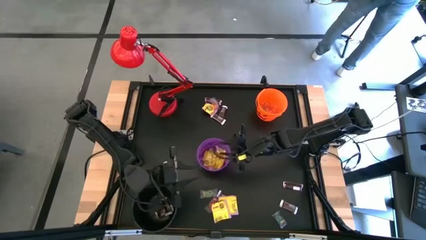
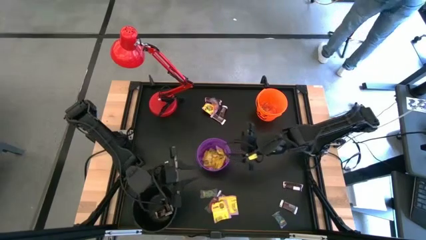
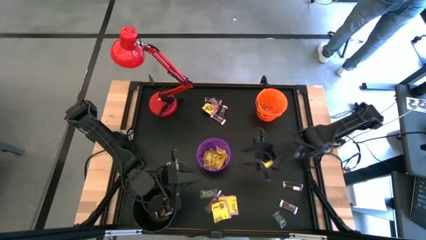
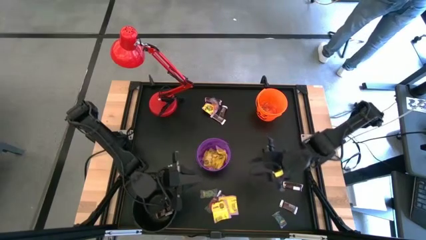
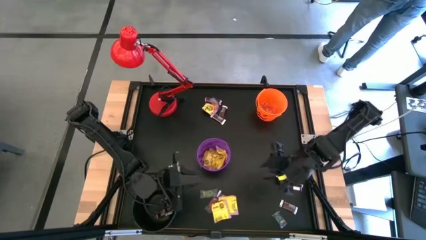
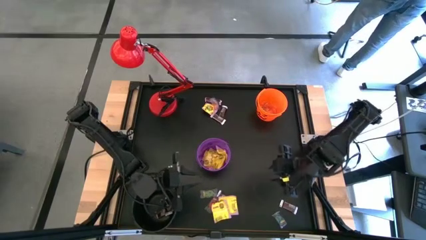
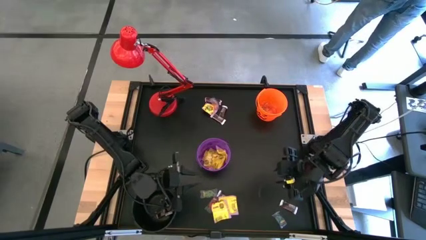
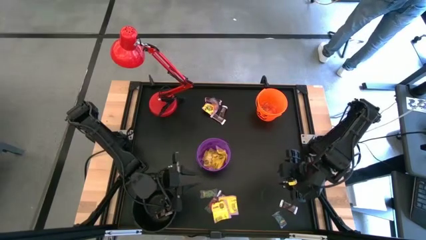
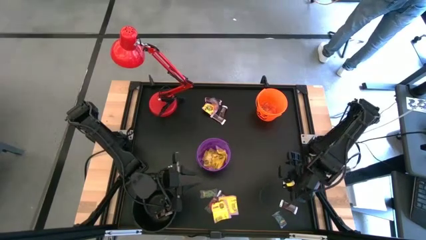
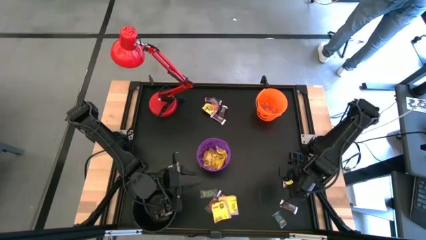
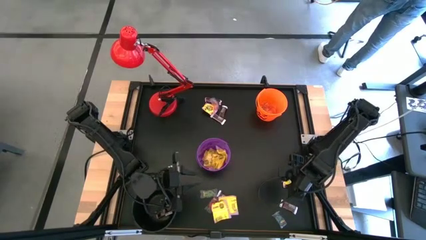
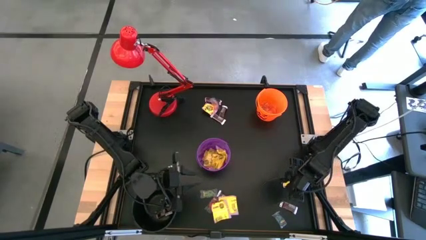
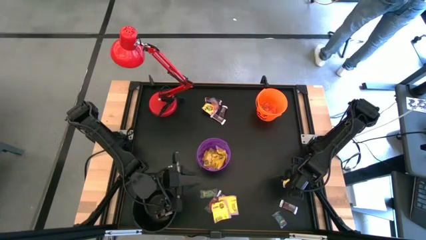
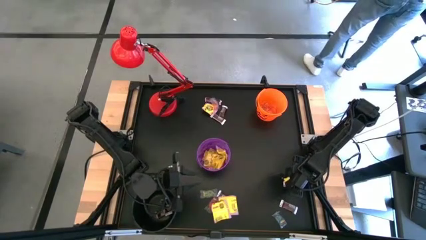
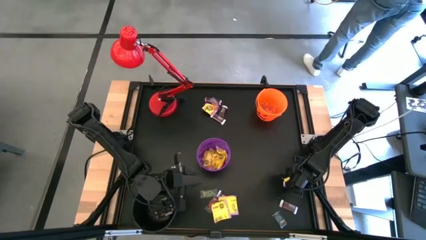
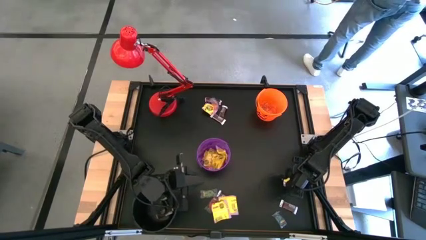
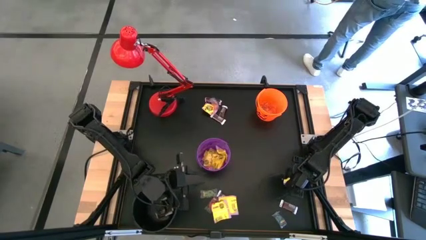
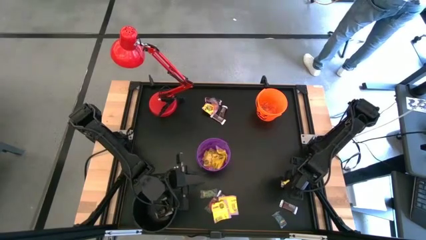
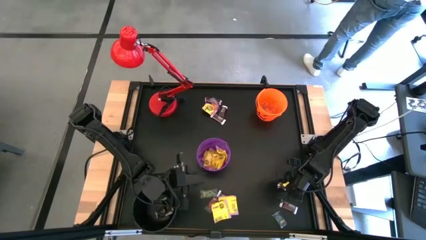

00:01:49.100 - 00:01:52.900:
Task: Sort candy
Put the brown chocolate bar into the black bucket

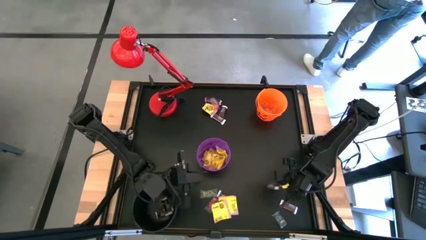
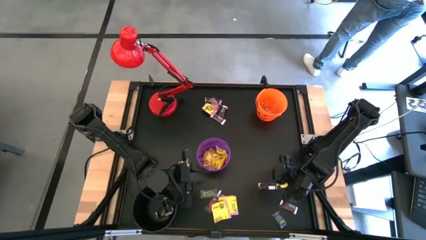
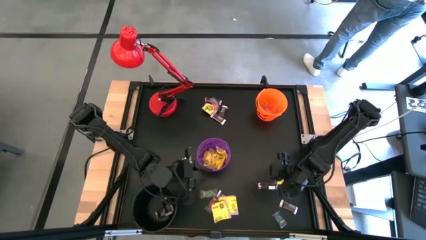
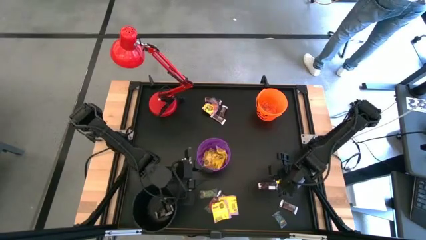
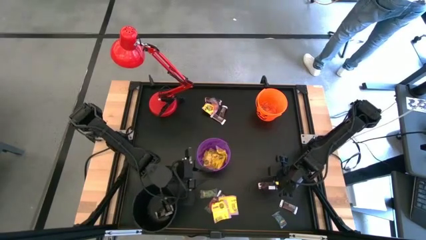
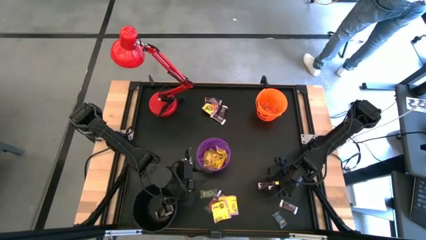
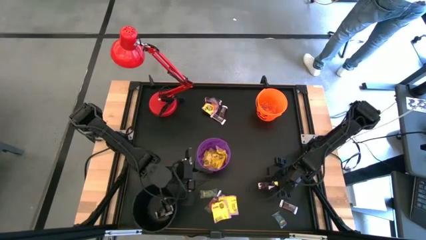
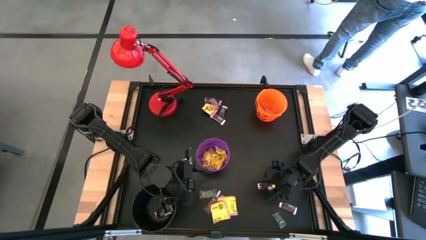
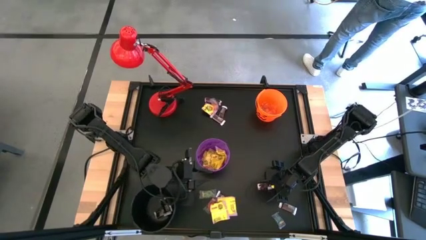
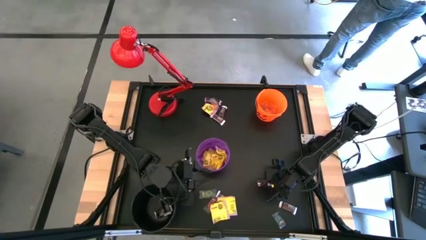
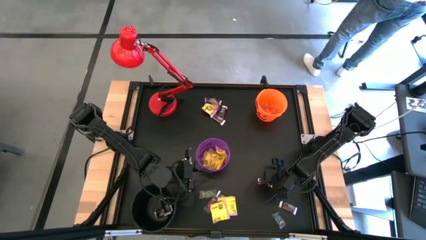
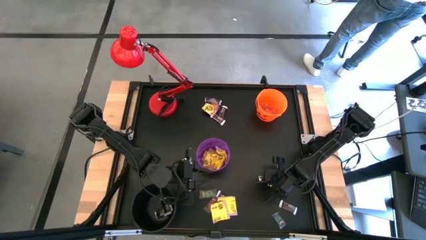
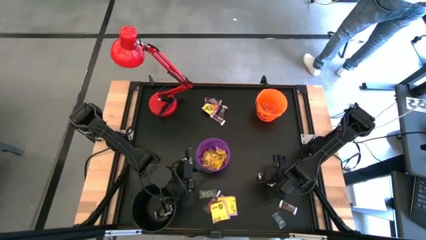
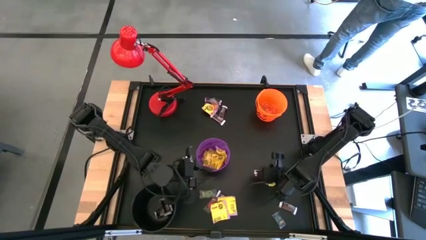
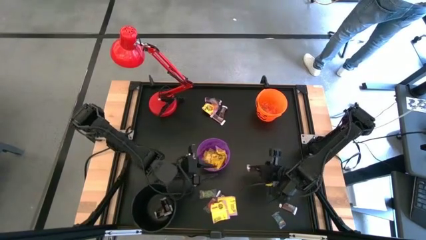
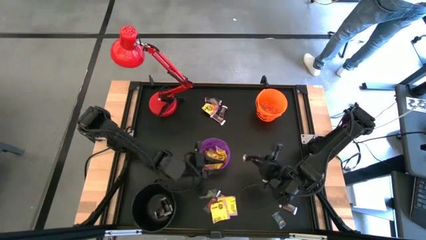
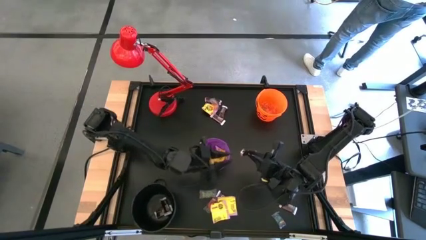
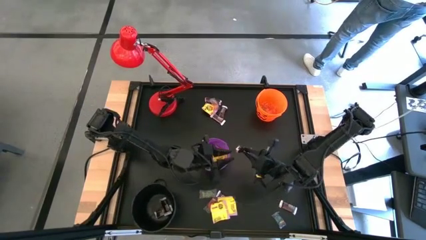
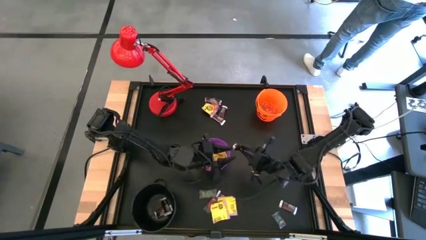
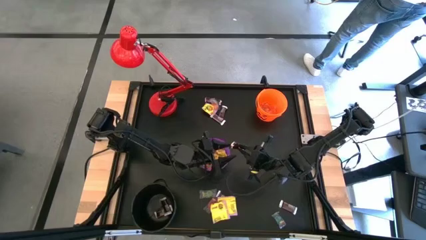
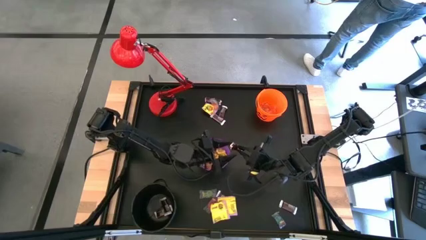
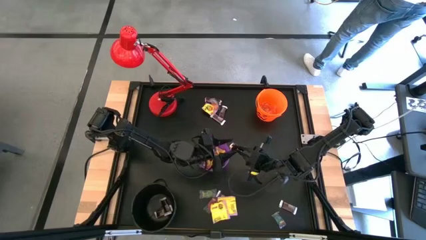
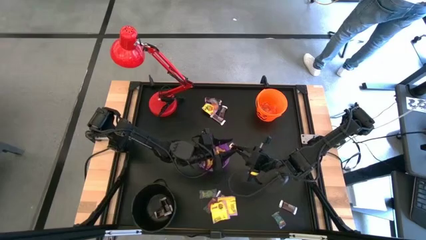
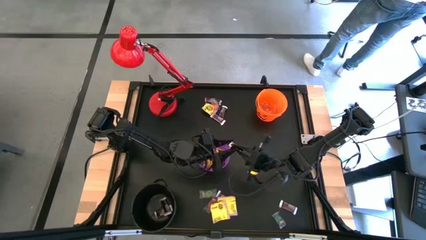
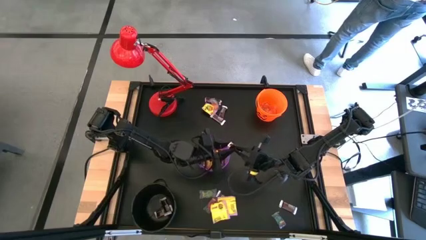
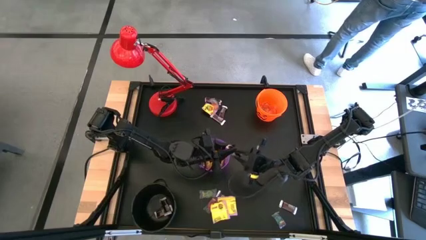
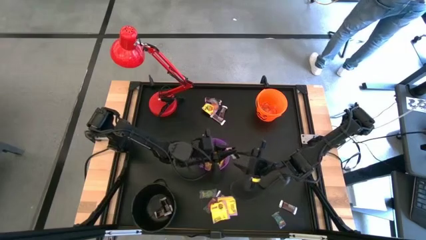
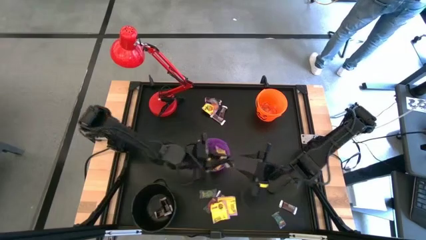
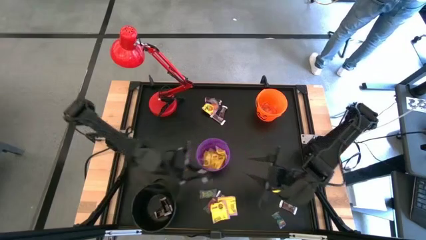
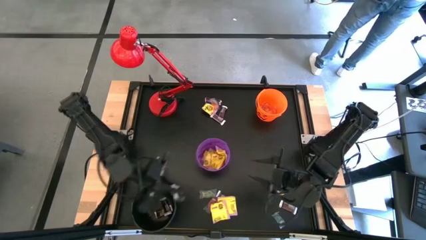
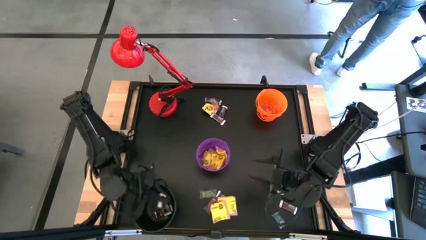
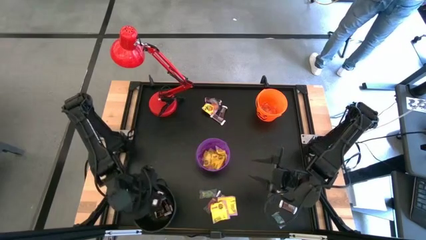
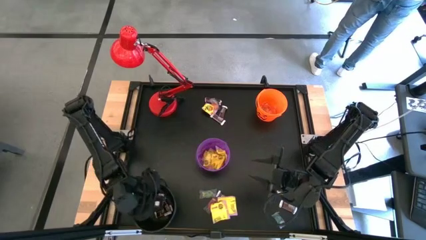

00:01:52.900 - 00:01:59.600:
Put the brown chocolate bar into the black bucket

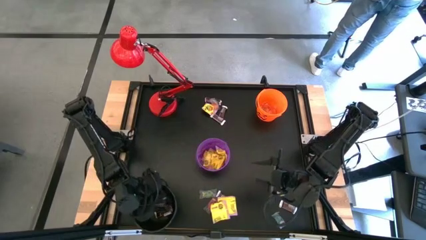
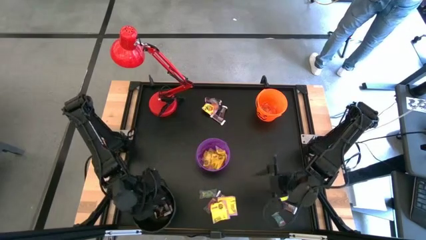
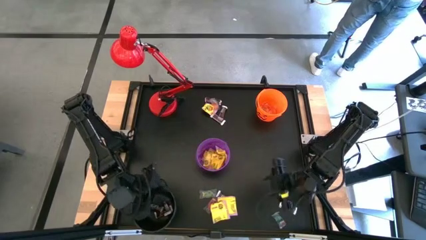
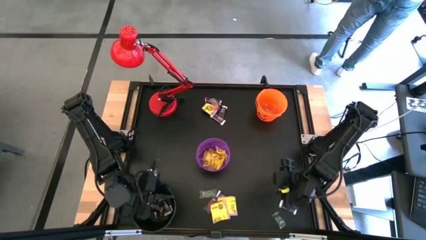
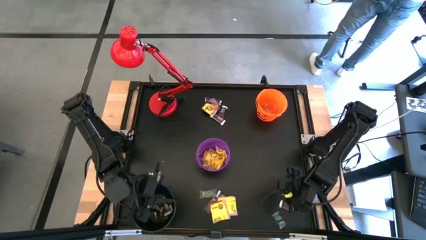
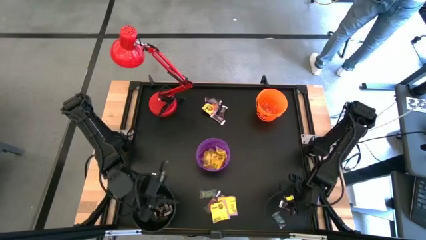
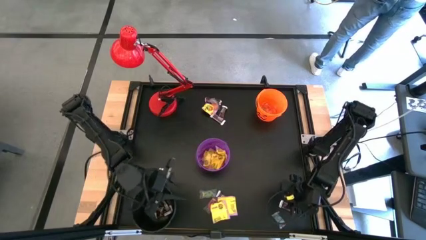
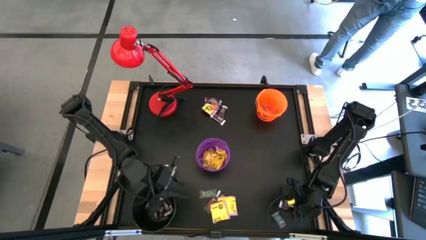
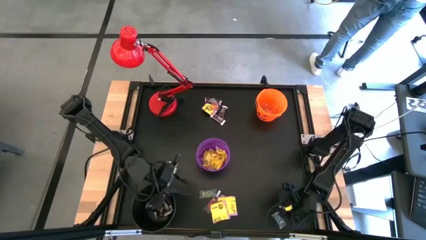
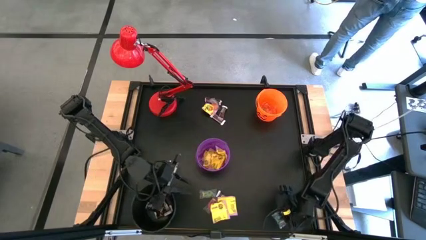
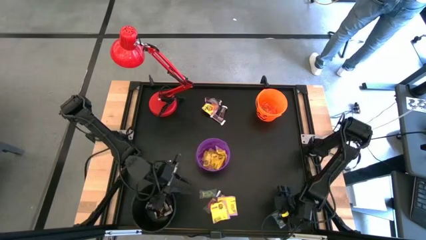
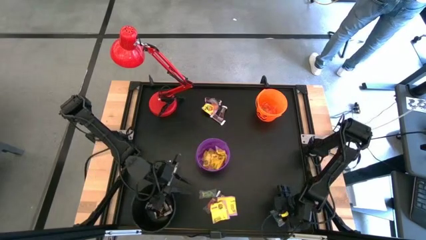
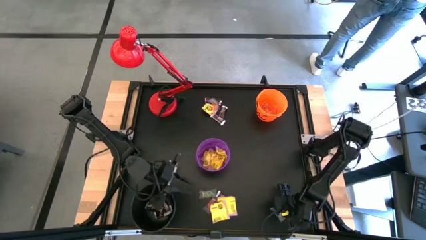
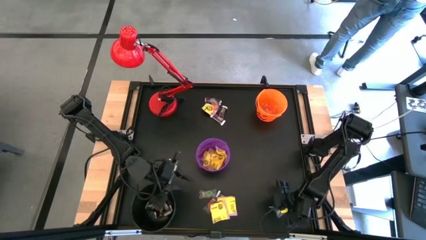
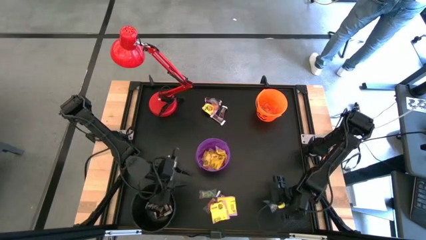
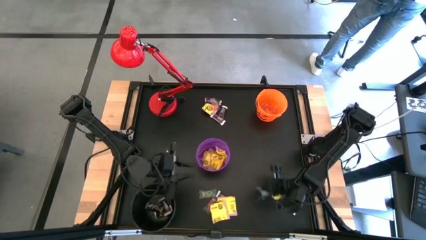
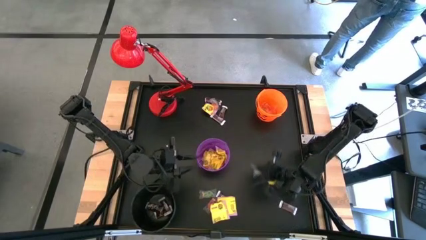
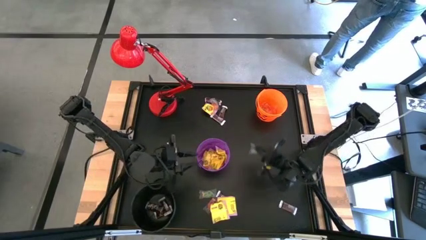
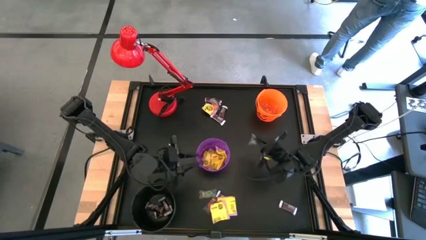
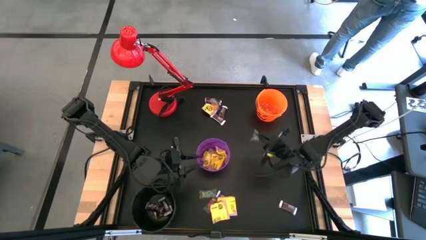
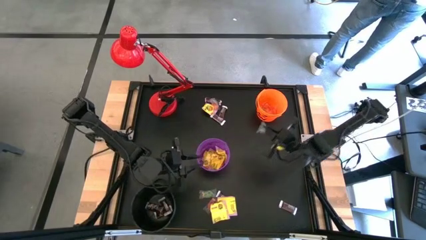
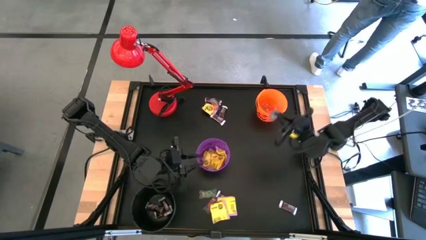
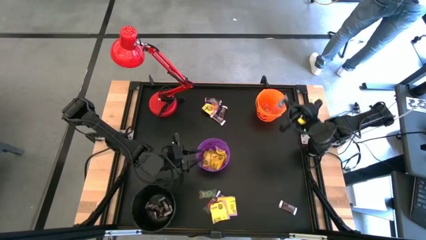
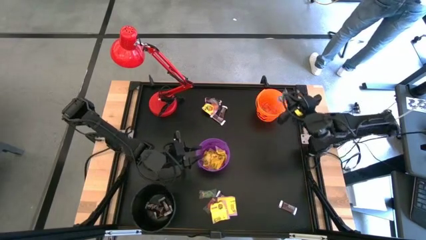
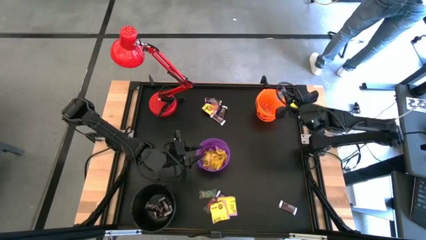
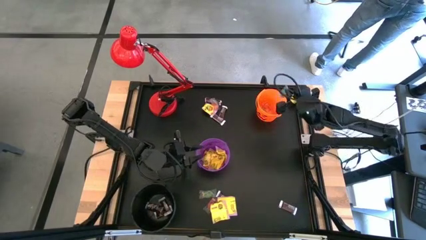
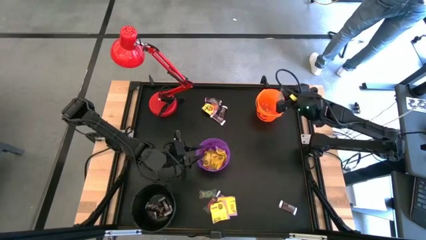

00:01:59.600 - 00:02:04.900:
Put the blue gummy into the orange bucket
